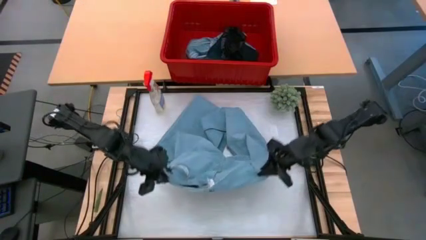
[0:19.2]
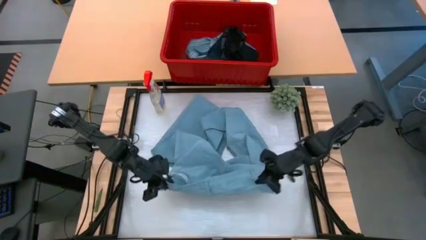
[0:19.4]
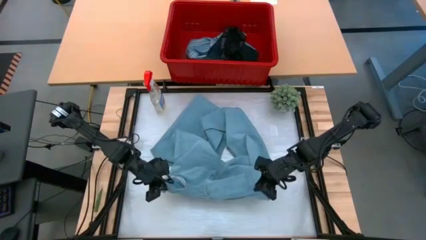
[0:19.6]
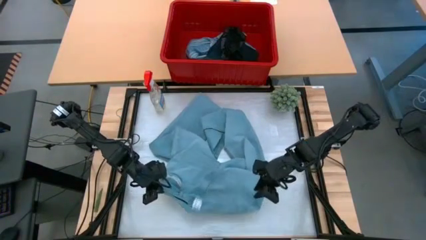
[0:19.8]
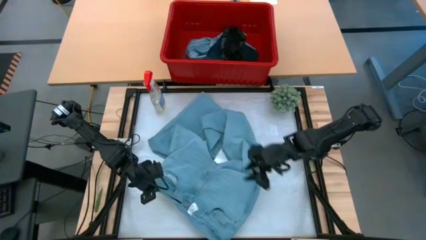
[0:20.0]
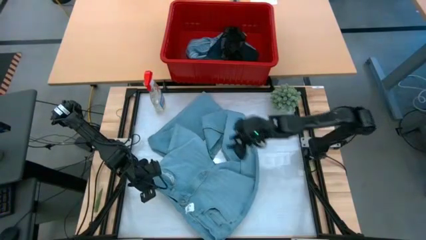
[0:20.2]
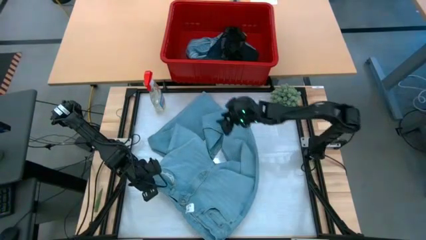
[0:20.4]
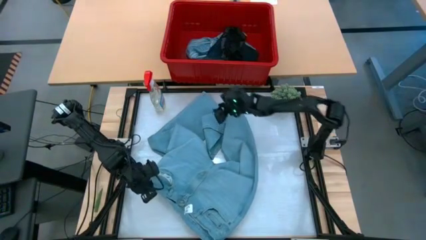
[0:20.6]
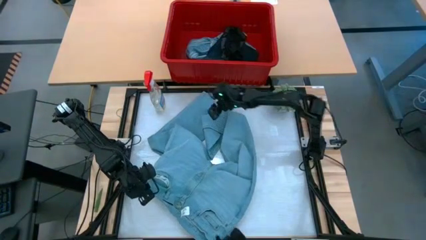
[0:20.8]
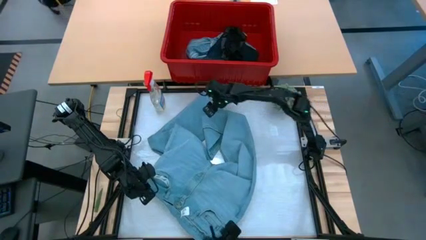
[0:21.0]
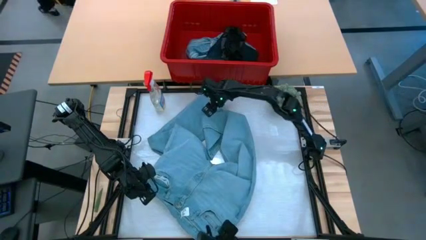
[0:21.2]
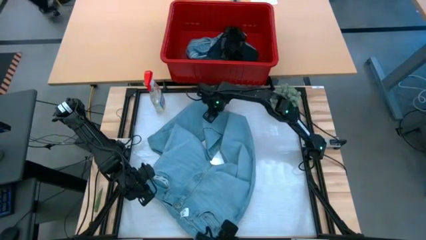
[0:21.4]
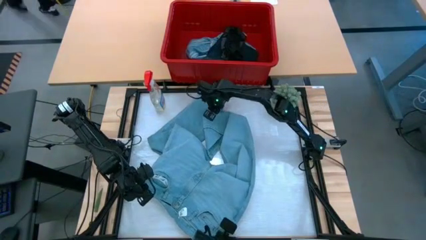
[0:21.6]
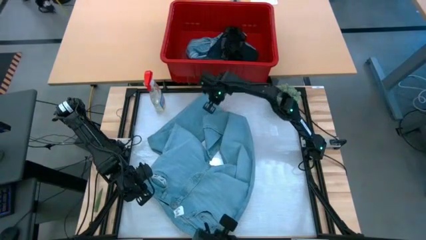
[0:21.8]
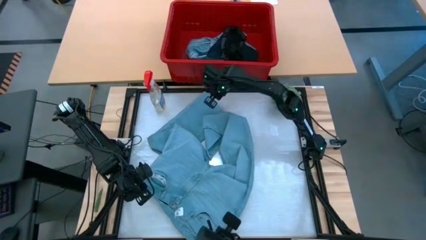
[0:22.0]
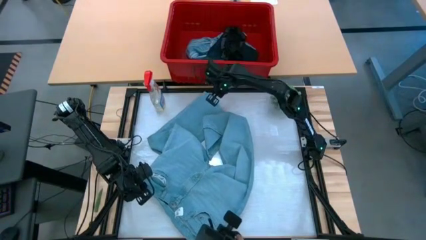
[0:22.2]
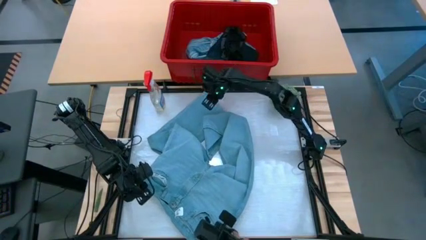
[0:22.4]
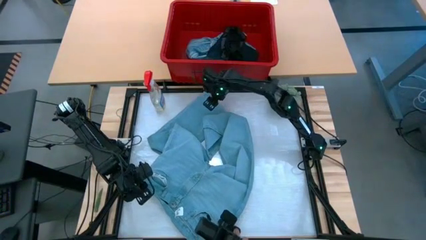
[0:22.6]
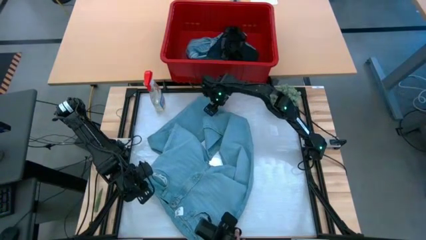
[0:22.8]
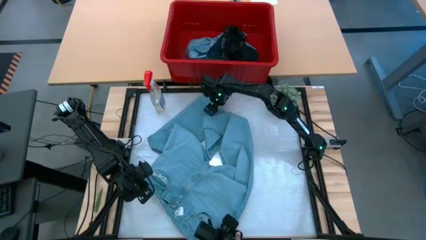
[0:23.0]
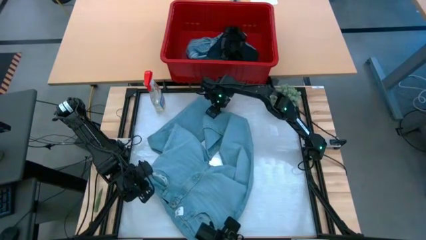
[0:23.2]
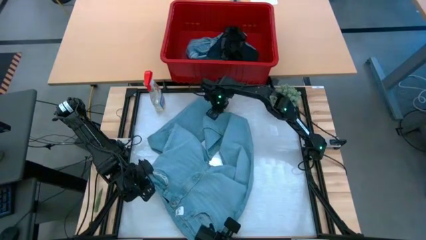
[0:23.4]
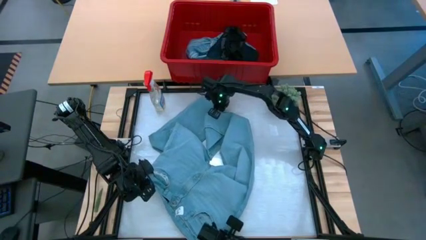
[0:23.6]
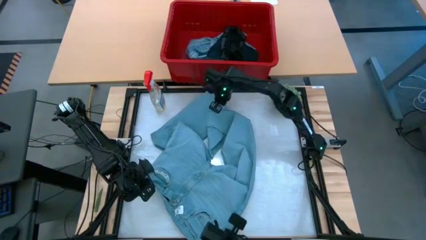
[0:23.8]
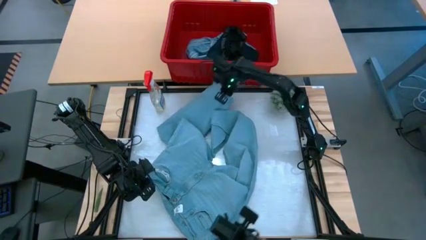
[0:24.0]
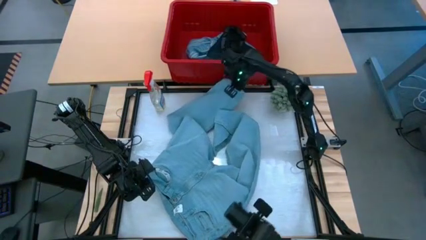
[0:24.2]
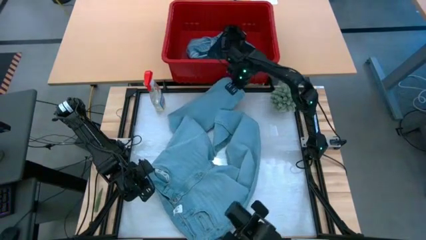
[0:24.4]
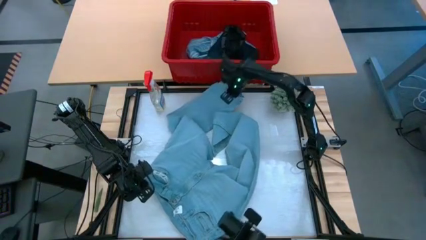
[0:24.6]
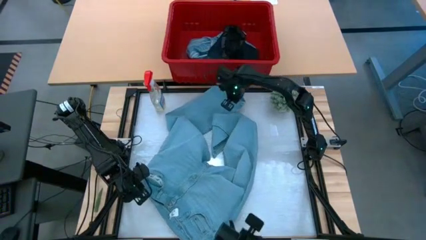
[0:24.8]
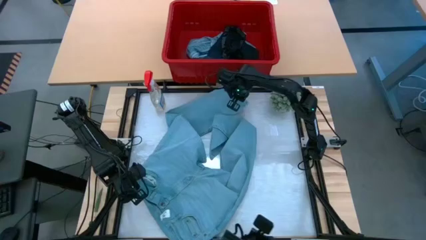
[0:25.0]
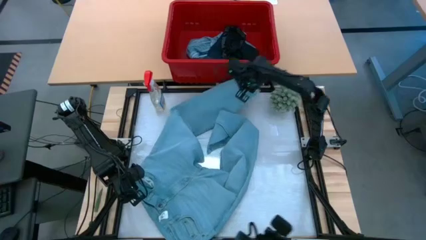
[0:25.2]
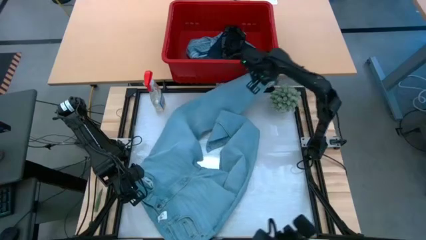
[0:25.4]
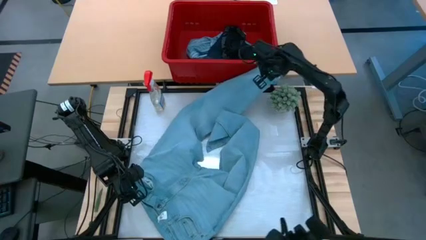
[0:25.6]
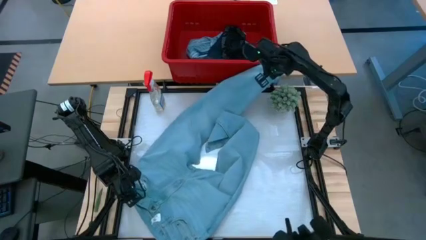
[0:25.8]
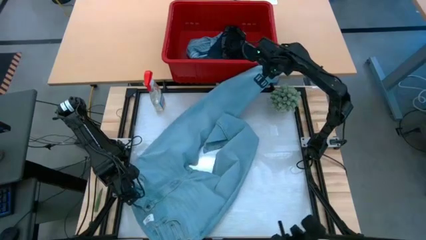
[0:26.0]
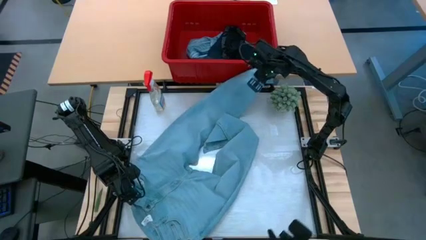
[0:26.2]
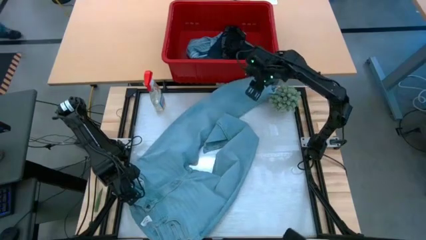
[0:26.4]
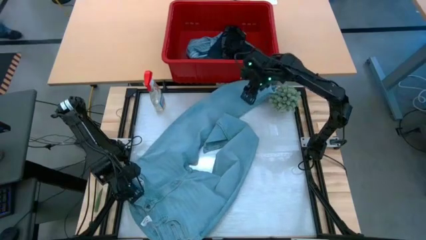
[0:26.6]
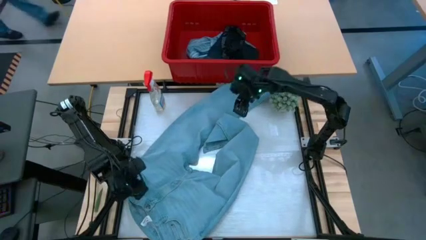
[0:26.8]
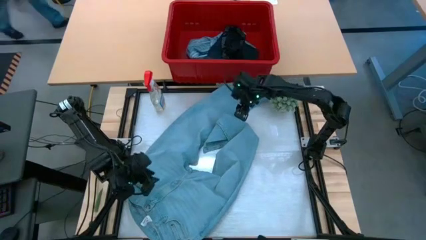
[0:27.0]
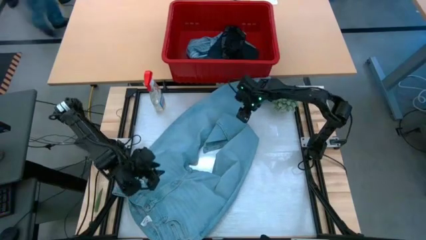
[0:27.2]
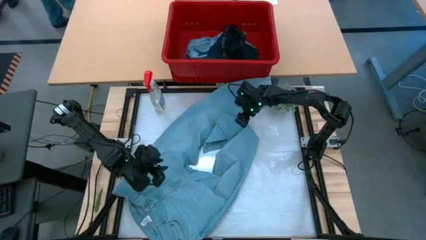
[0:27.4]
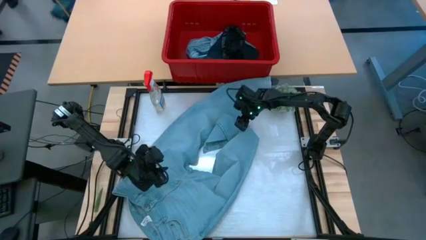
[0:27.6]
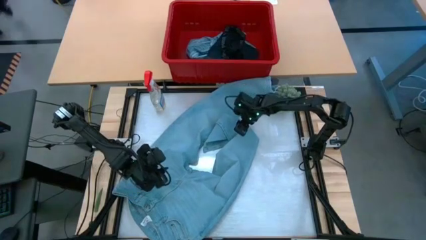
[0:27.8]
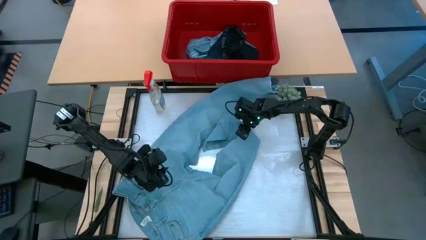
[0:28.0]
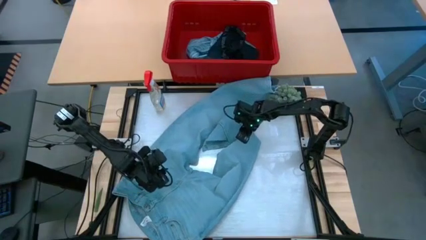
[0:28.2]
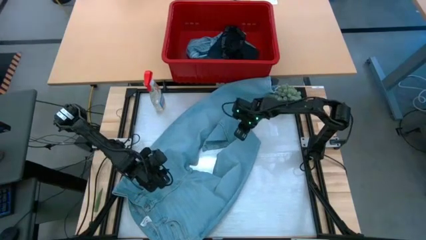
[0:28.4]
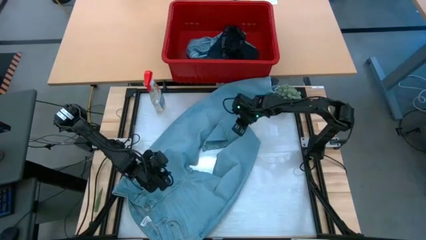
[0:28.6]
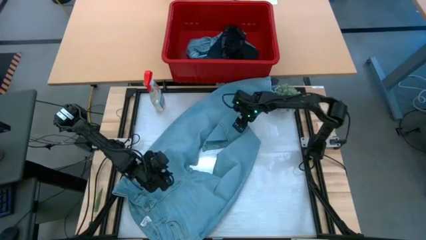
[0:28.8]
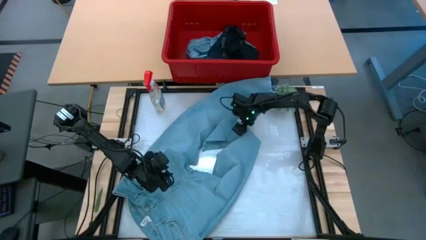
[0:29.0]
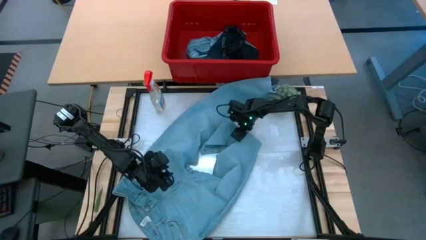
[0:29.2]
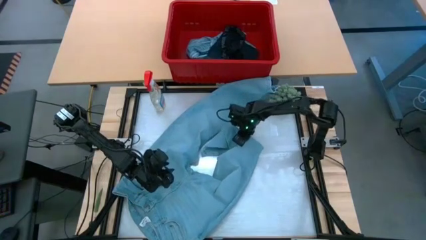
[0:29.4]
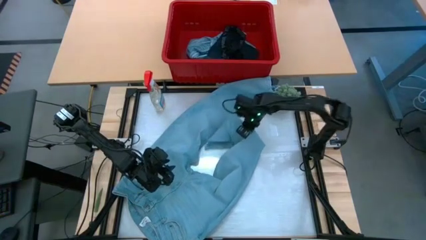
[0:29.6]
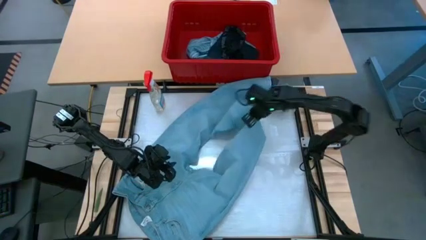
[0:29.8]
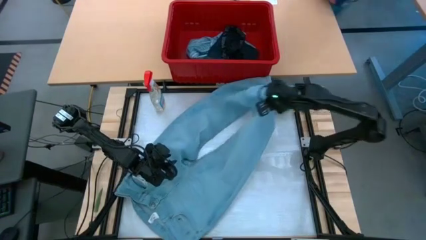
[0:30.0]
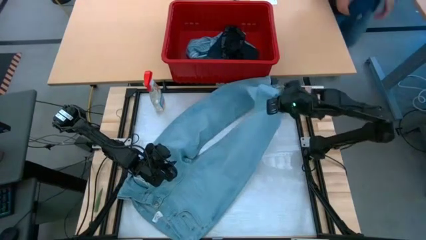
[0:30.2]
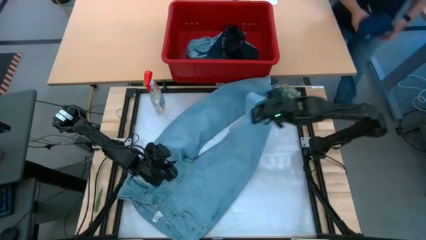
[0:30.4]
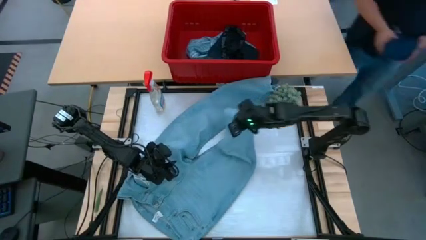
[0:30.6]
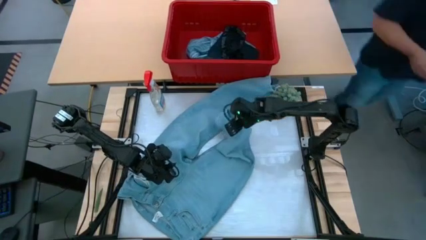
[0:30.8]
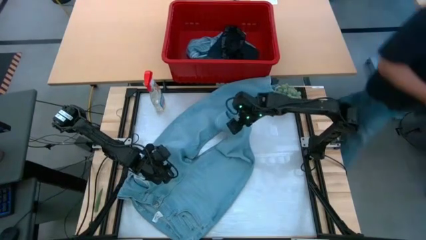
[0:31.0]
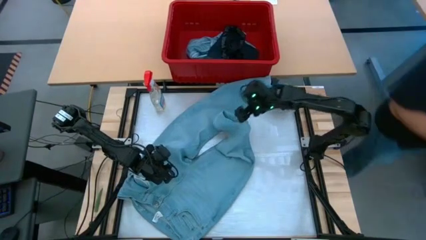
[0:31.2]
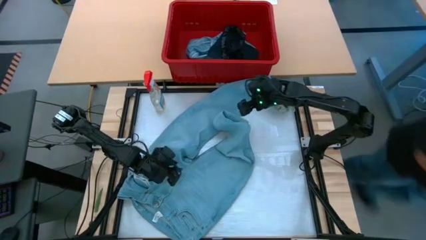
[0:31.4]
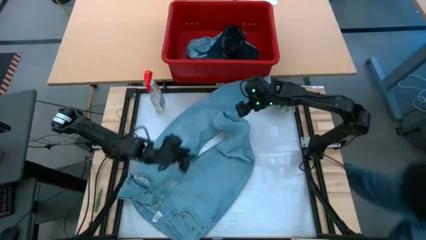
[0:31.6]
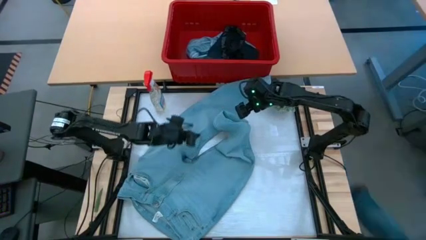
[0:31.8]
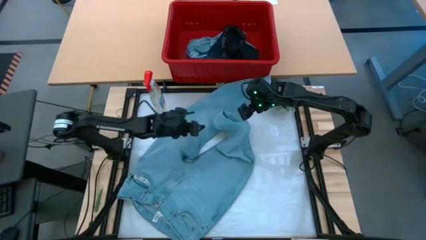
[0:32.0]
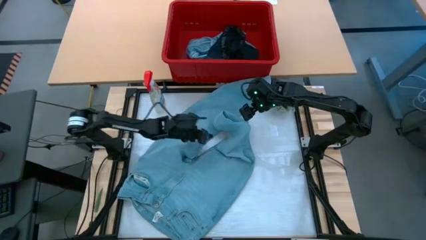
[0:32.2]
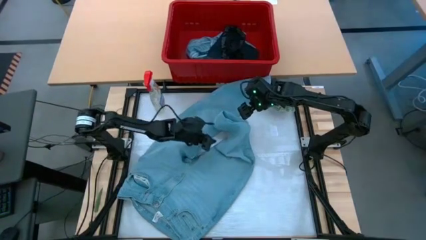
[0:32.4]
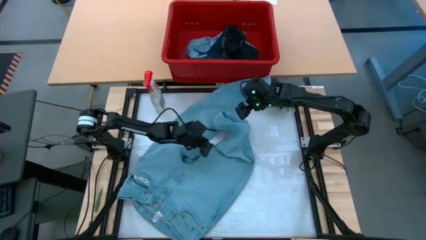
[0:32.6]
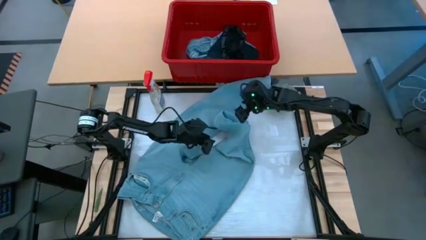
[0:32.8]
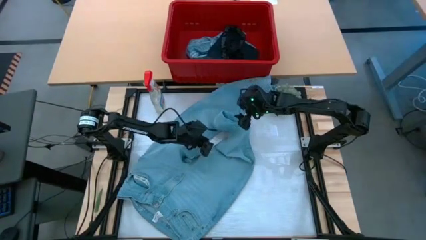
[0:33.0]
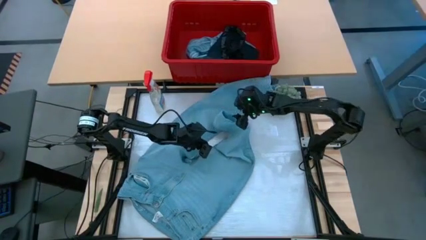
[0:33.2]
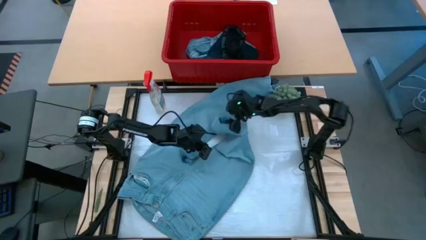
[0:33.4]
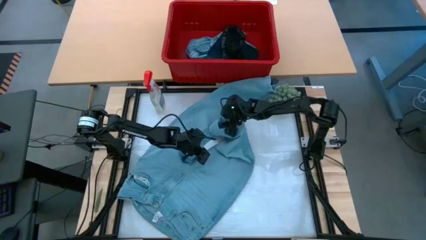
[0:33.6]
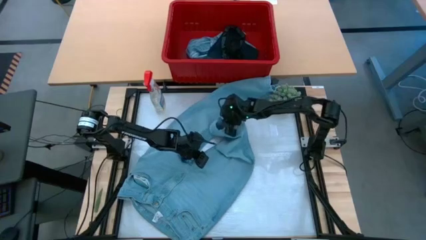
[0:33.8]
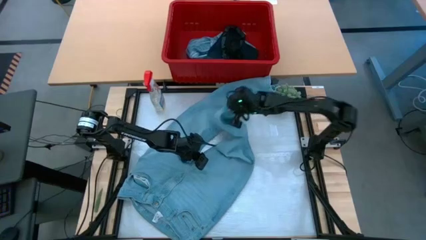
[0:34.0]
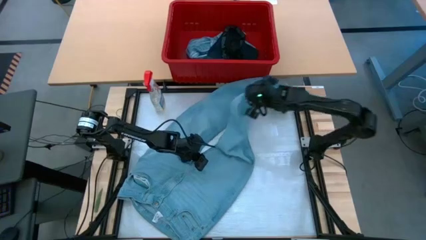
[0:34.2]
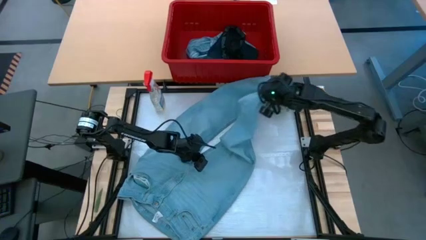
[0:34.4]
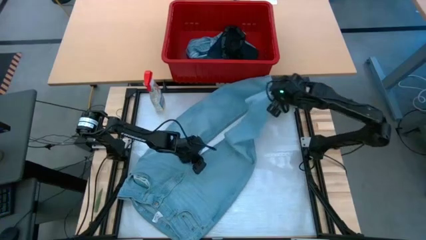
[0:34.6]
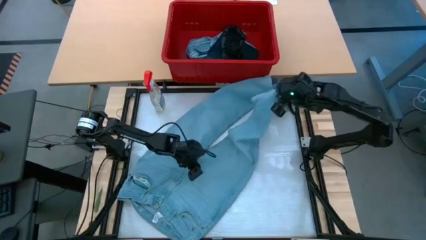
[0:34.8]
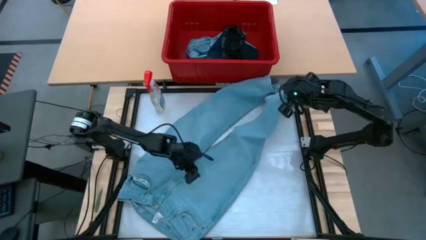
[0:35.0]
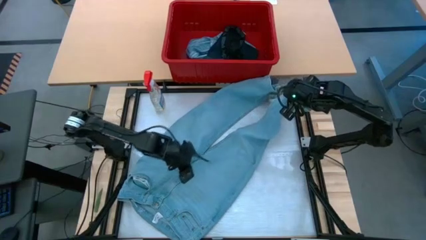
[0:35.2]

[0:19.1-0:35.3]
Task: Fold Laundry from Bin
Fold the blue pants from the red laundry bin
